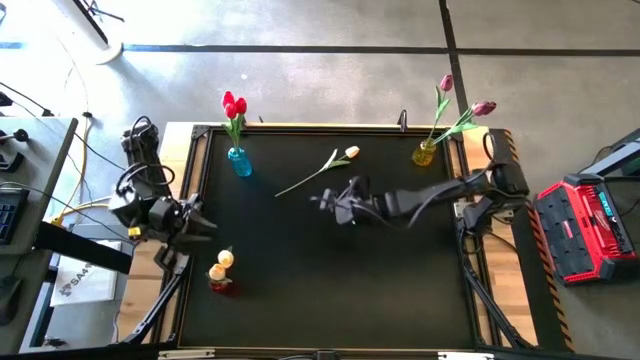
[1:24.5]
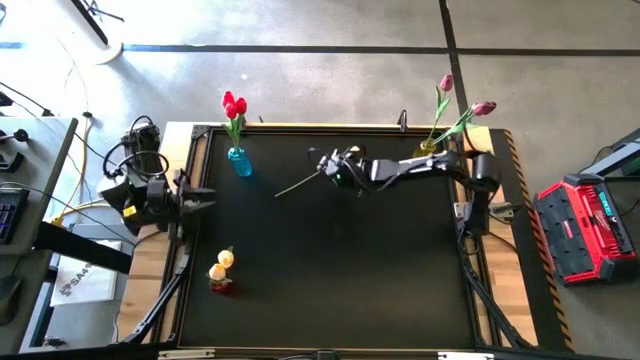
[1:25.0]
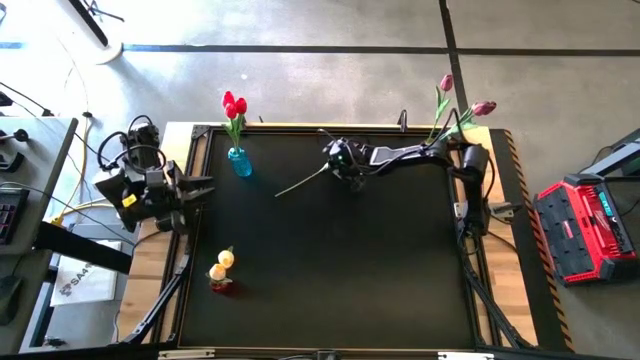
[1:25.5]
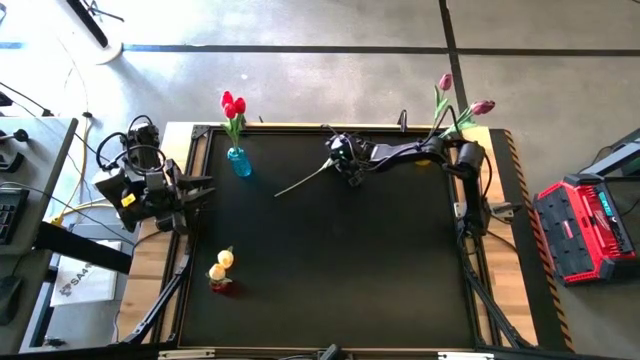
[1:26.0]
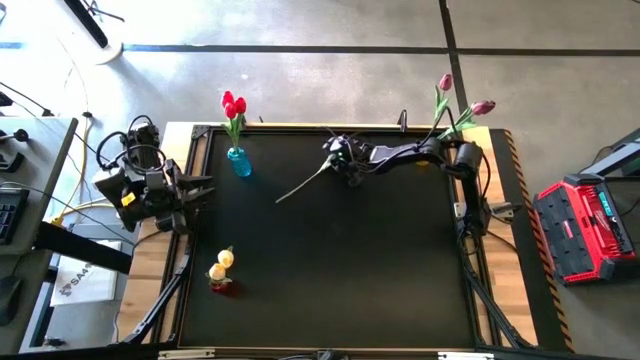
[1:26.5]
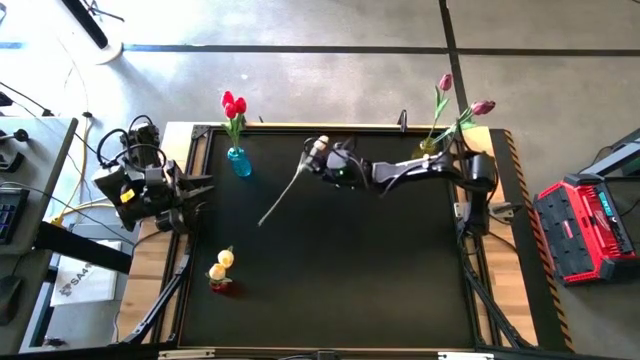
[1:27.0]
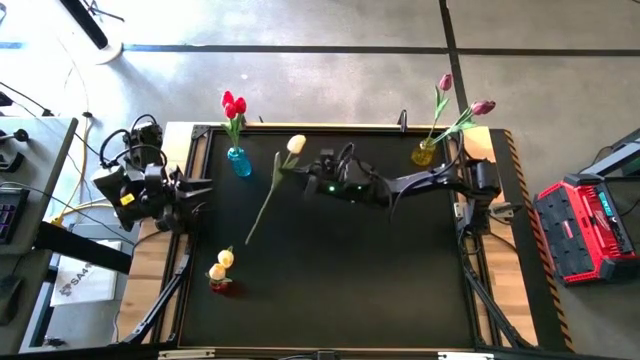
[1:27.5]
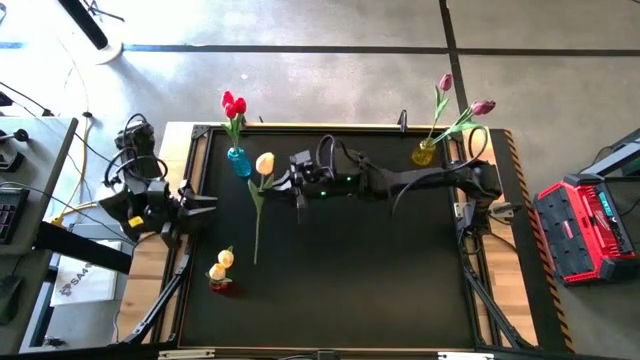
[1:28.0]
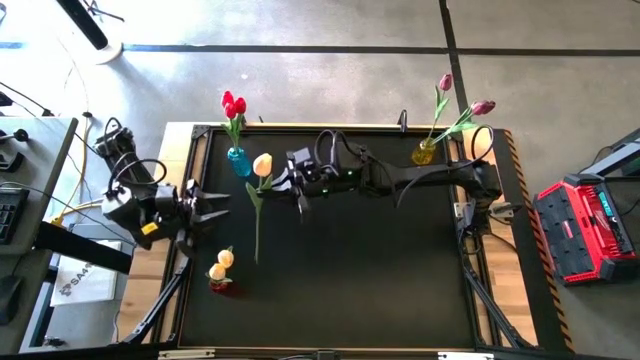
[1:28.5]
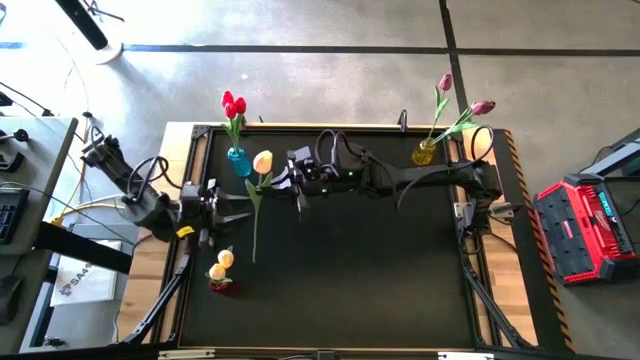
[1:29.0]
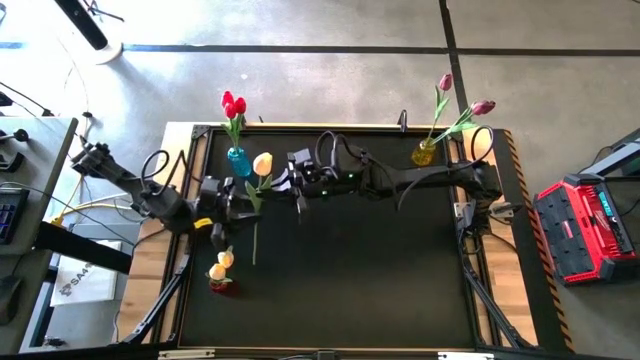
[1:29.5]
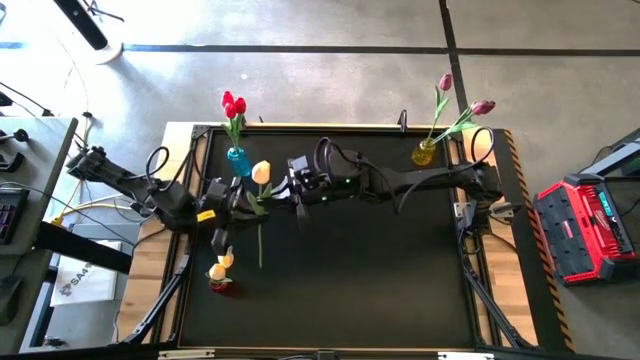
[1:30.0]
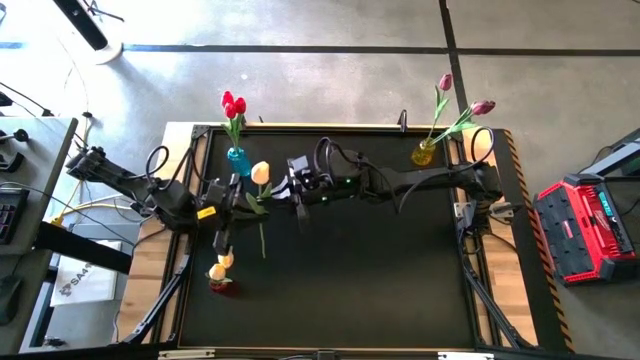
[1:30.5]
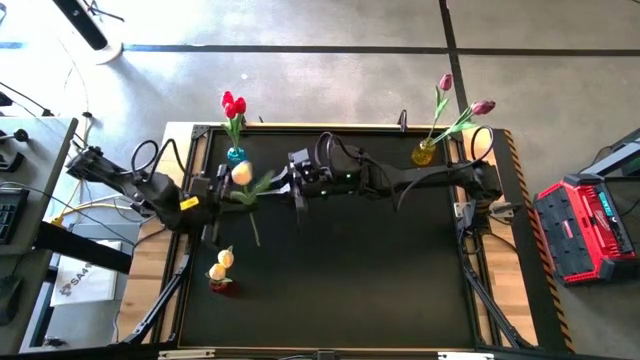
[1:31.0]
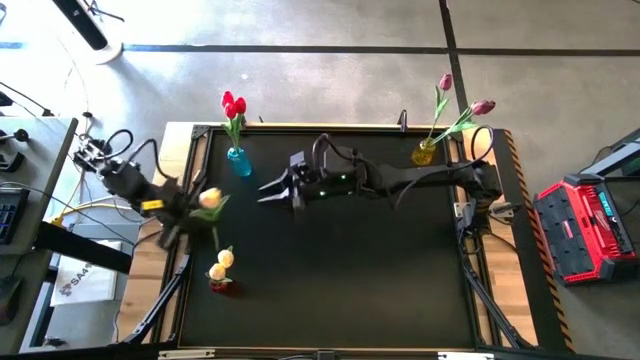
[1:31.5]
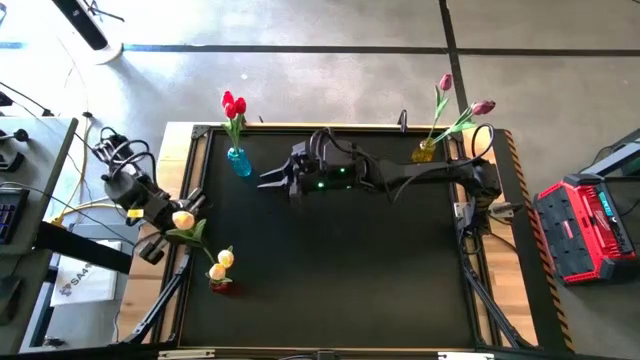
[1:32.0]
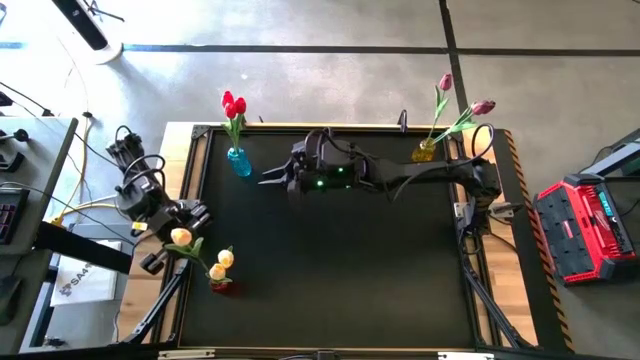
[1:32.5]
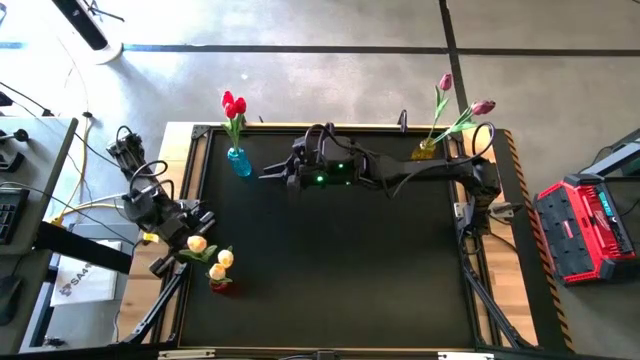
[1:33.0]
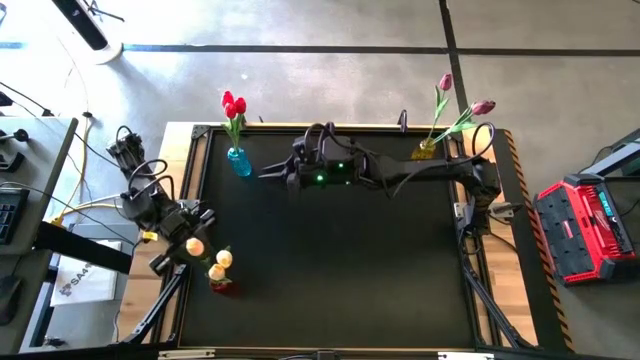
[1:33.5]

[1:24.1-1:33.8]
Task: Sort flowers into vase by color
Put the yellow flower into the red vase

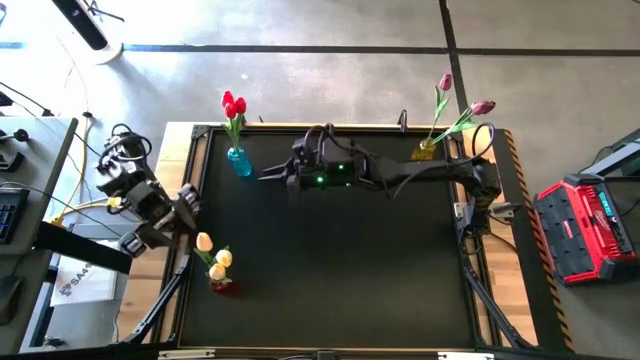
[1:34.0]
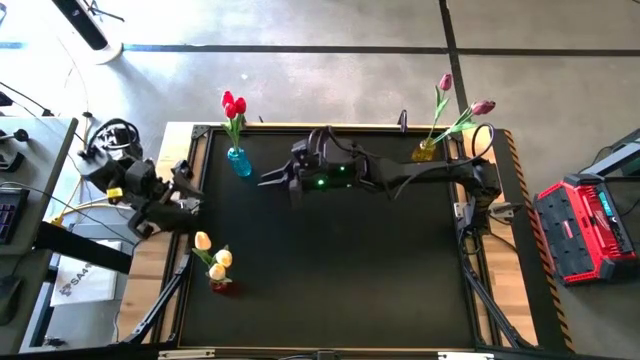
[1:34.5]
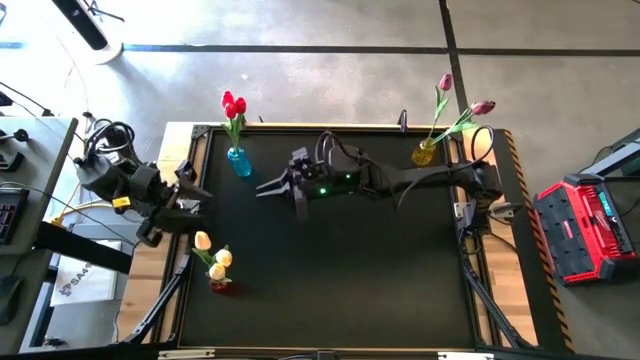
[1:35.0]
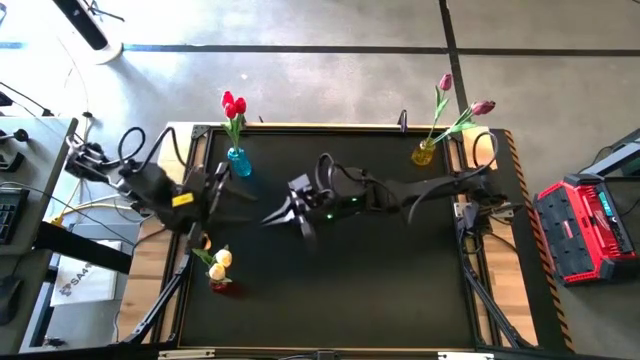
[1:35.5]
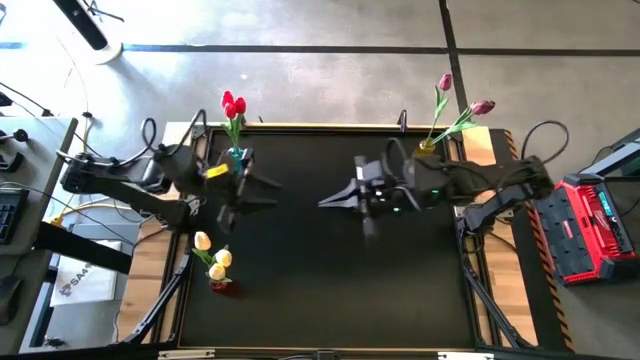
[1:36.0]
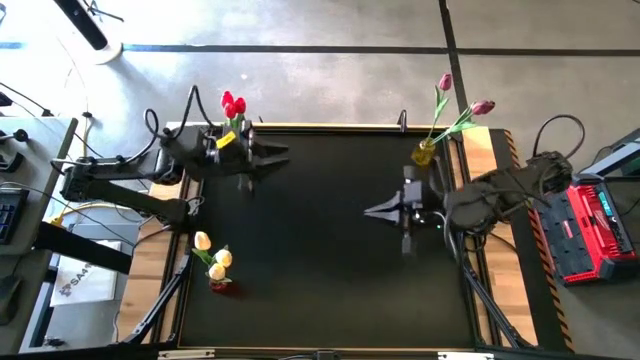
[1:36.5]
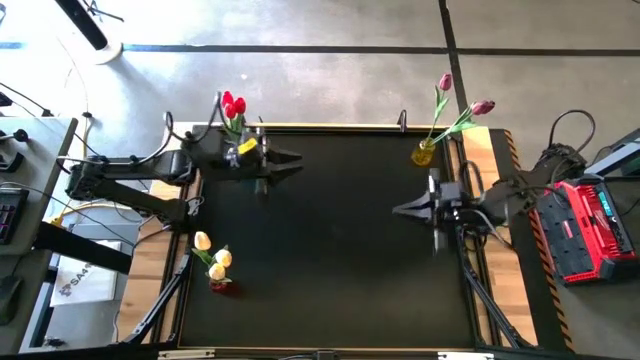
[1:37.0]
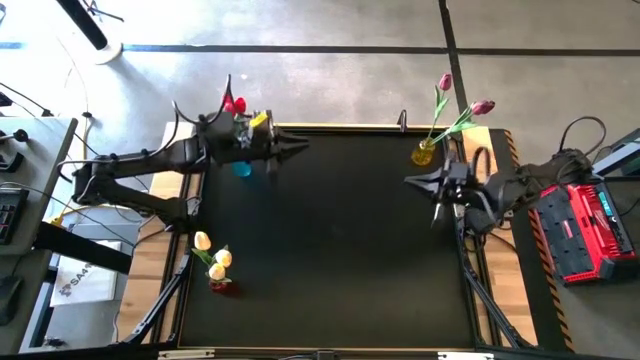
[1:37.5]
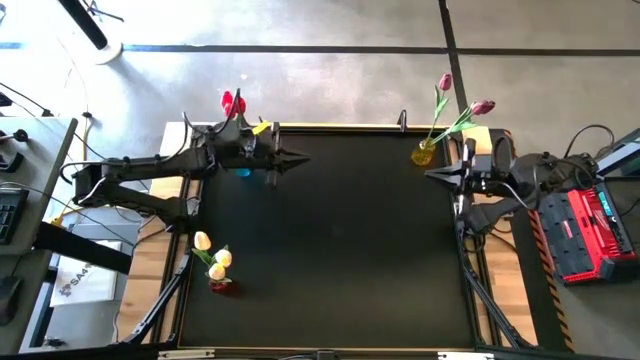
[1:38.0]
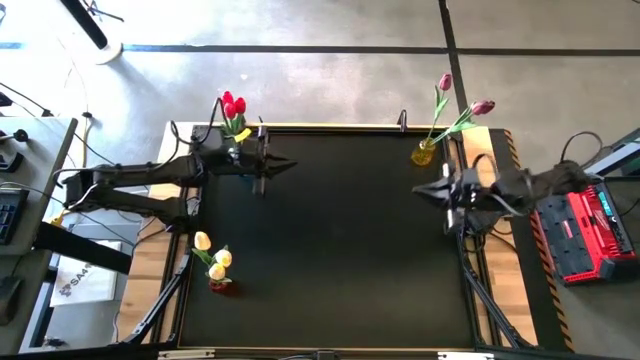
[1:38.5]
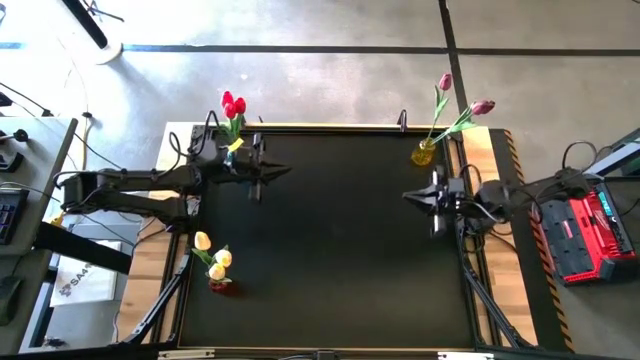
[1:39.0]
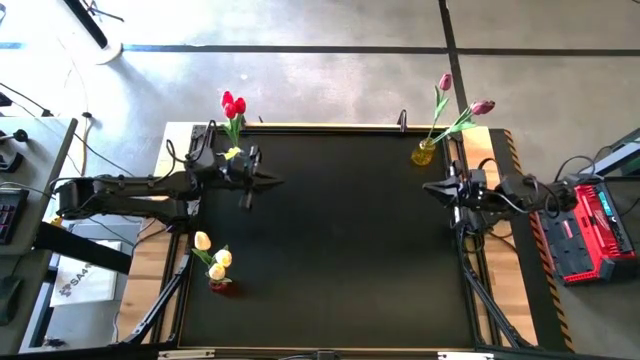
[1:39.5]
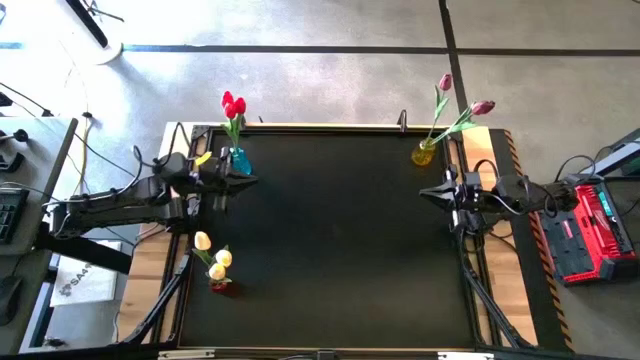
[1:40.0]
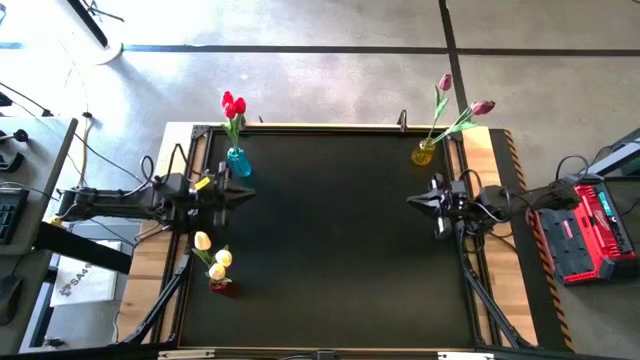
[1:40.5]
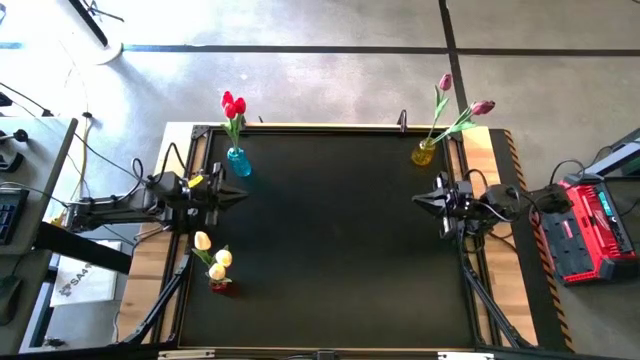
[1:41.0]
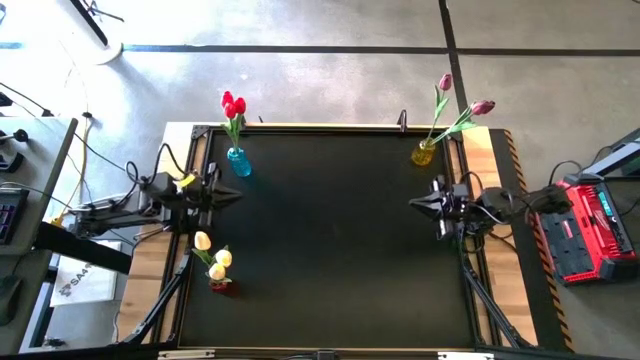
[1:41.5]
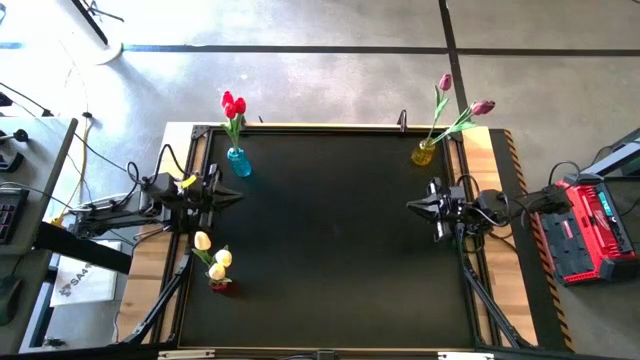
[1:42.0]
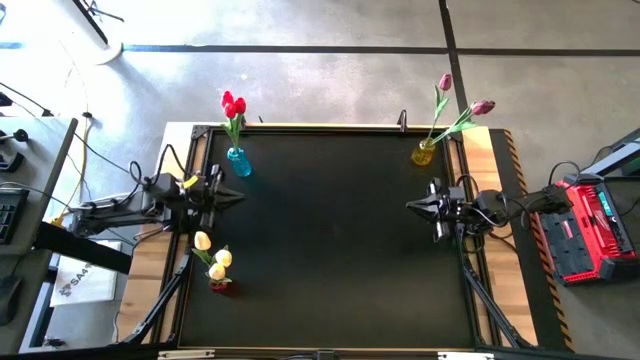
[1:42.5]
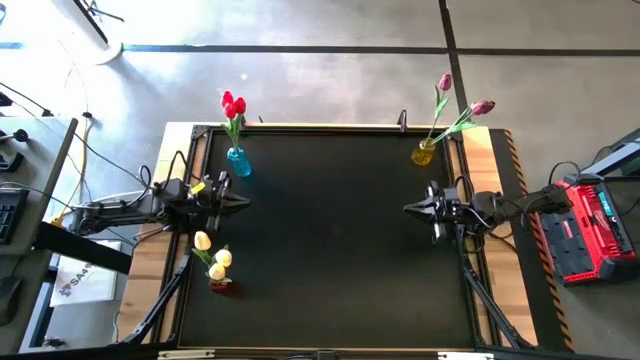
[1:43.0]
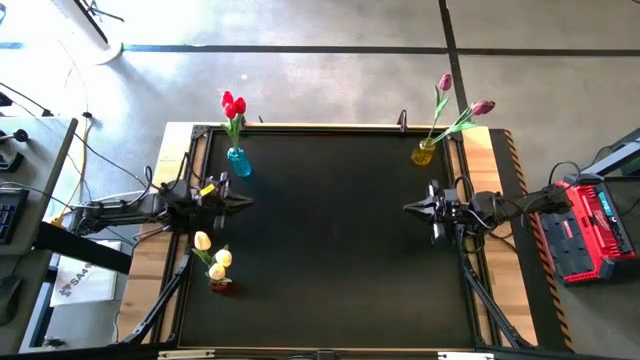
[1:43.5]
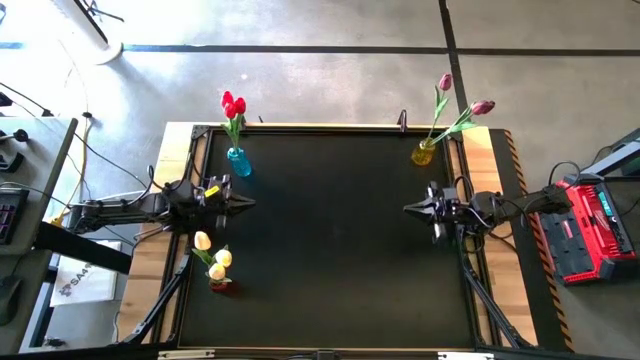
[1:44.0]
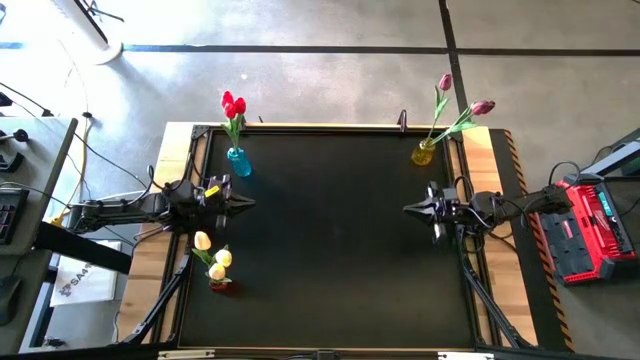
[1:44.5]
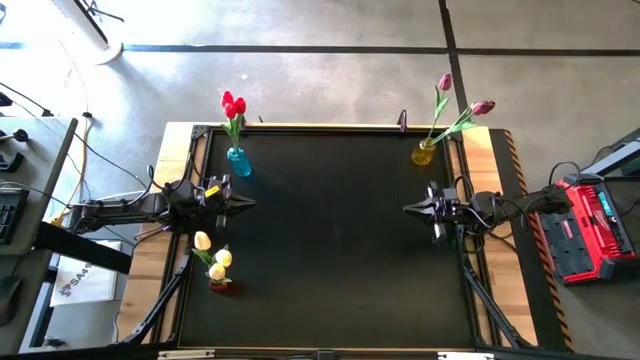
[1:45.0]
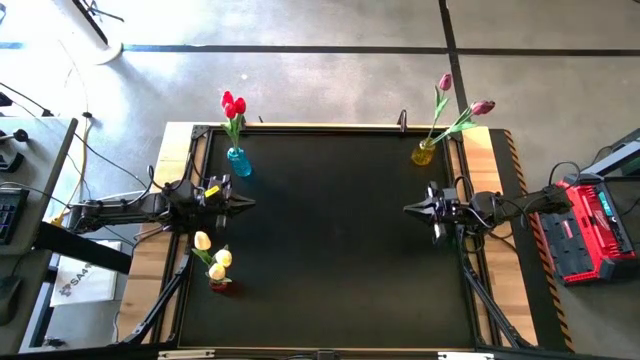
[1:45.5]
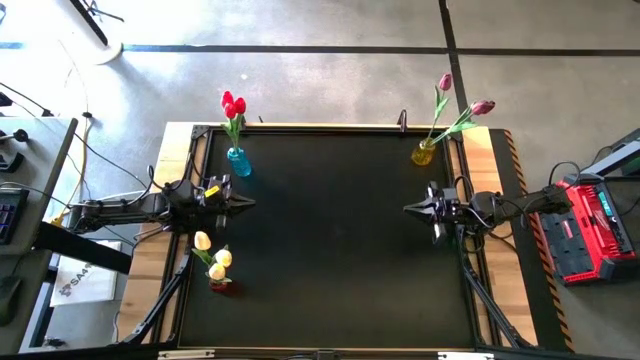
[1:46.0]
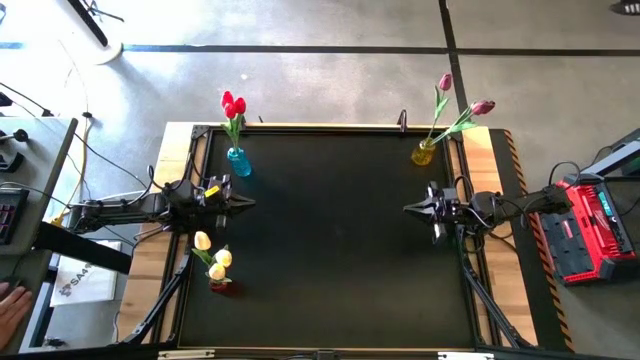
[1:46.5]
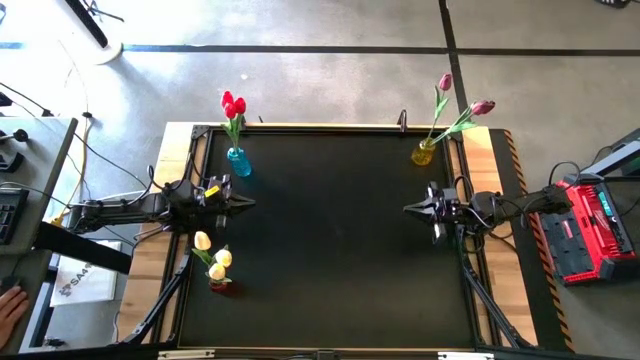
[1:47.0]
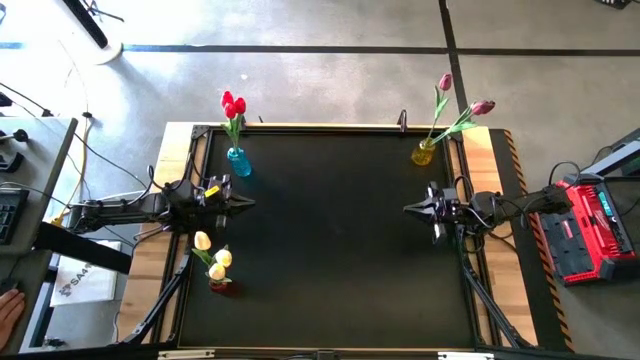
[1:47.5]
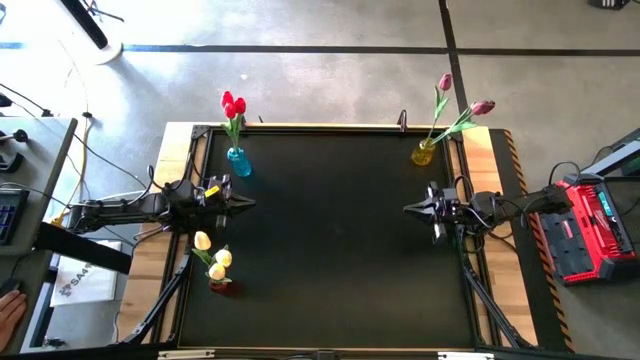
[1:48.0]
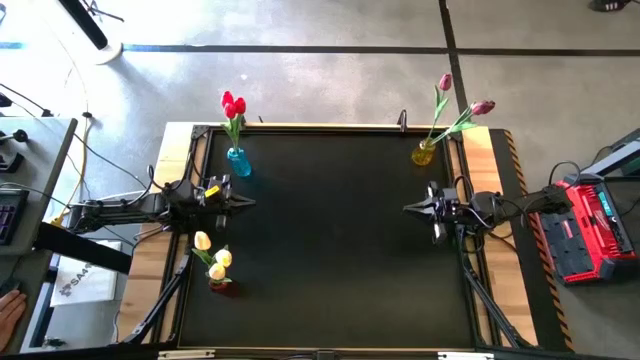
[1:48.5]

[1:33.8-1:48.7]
Return to Home Position
